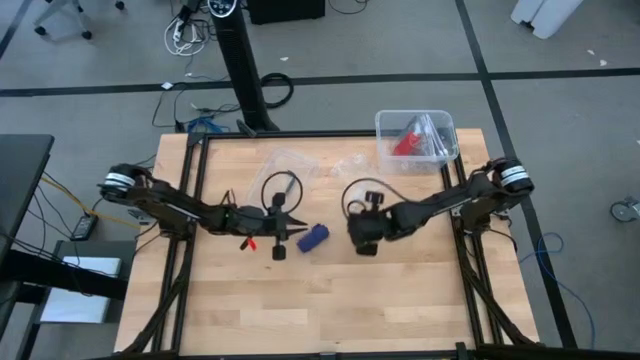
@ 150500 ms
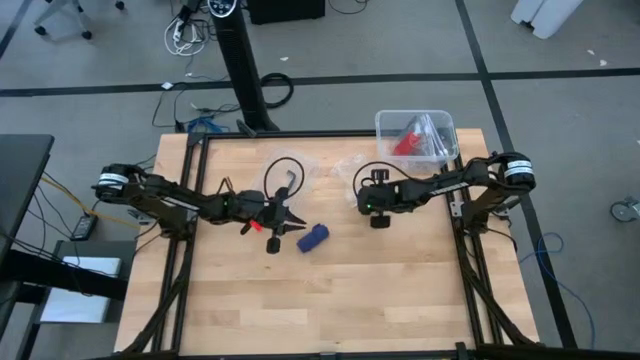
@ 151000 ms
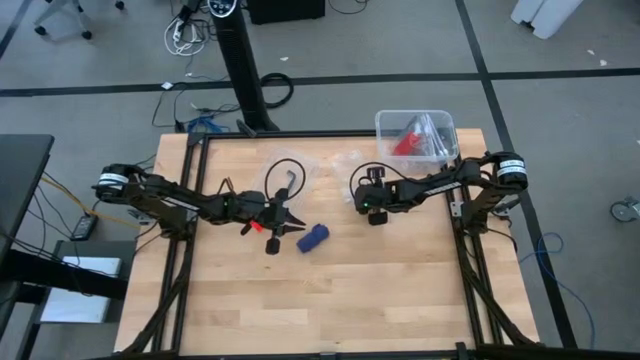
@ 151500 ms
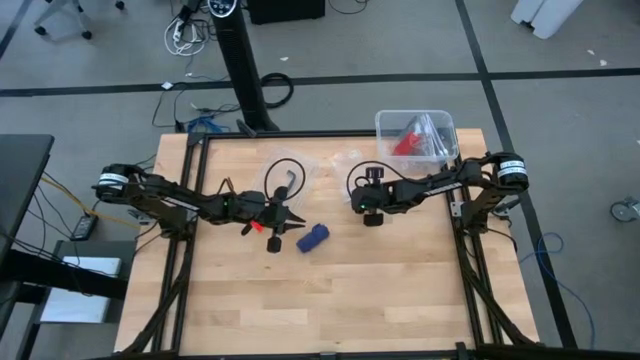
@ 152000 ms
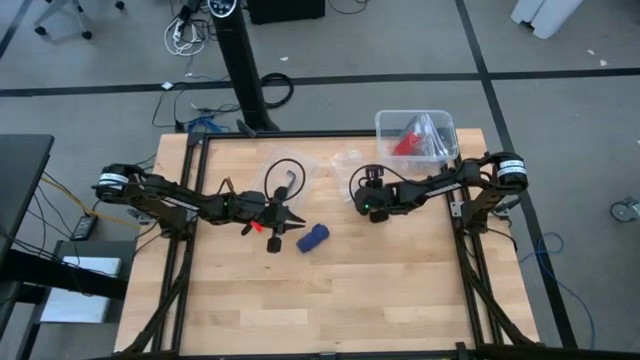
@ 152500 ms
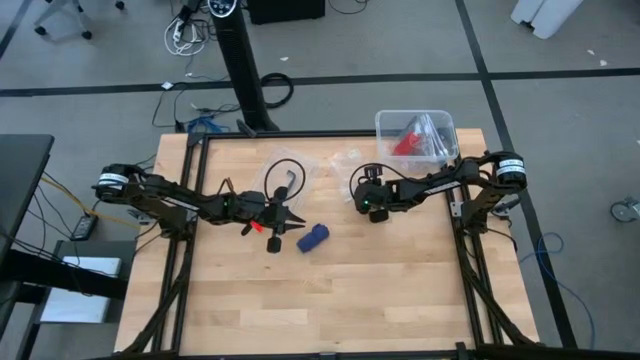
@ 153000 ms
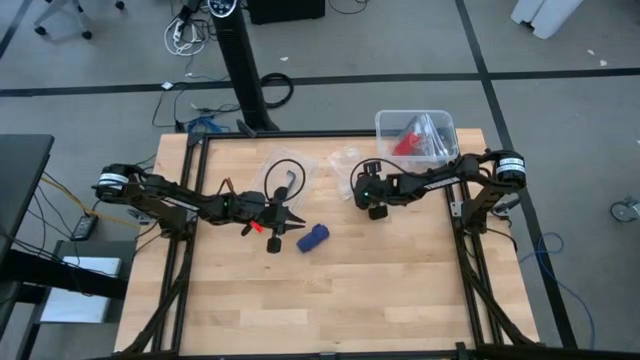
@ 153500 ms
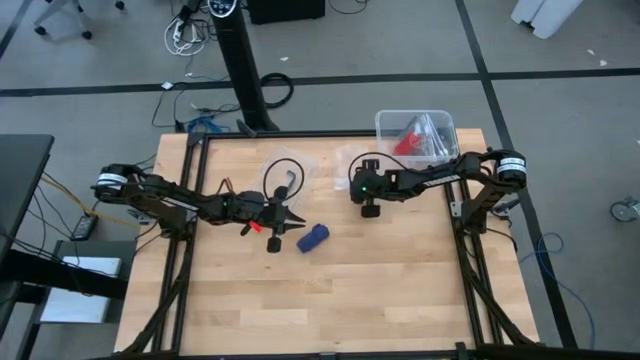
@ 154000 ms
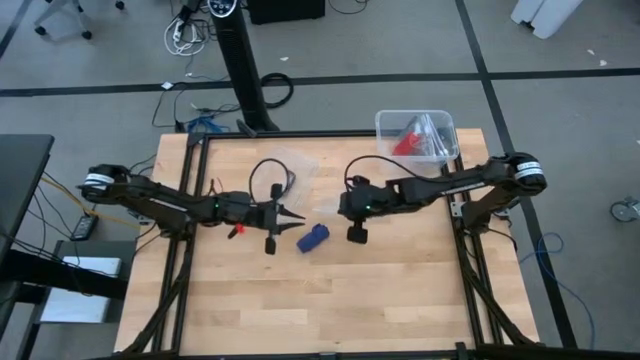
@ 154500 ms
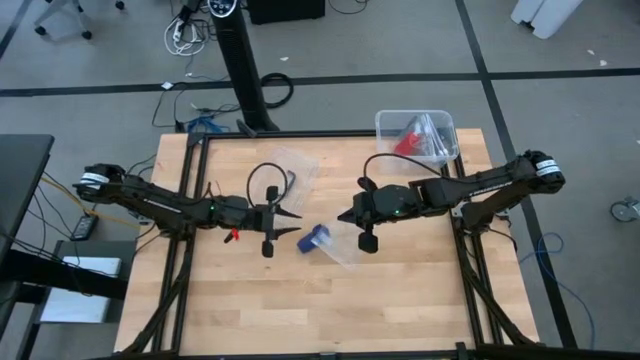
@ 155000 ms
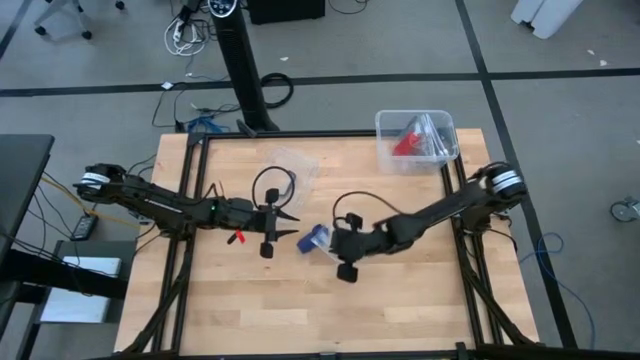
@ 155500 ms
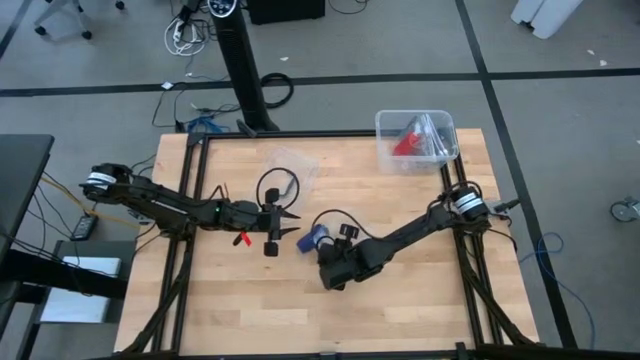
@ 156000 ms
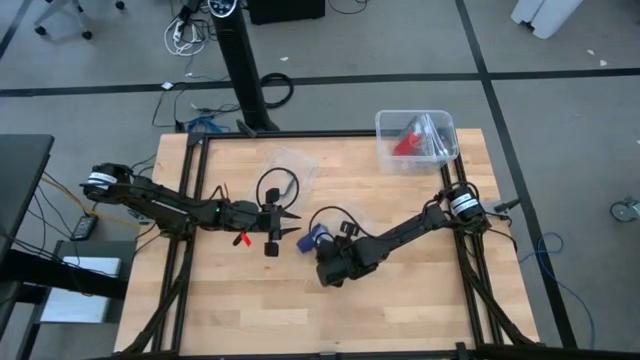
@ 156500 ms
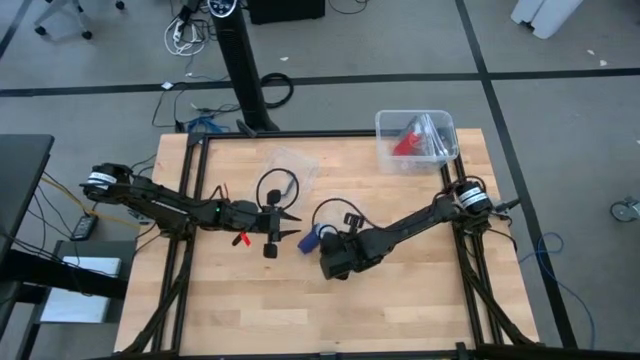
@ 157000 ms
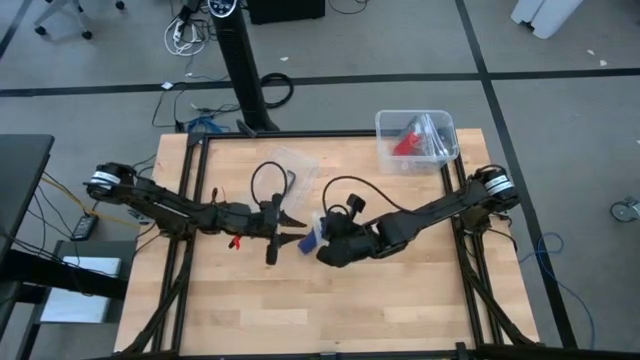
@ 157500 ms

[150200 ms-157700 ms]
Task: Roll bandage
Open the transparent zip bag

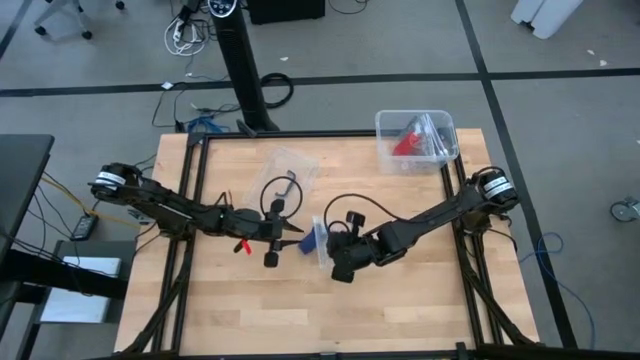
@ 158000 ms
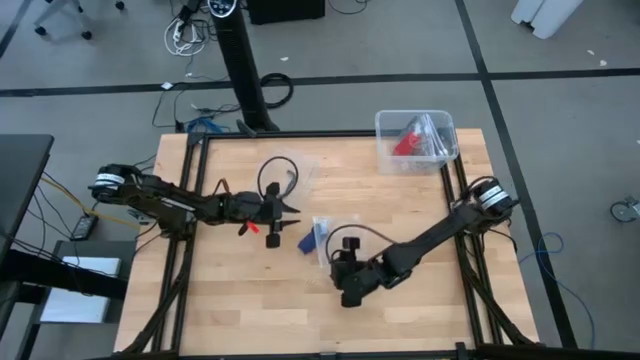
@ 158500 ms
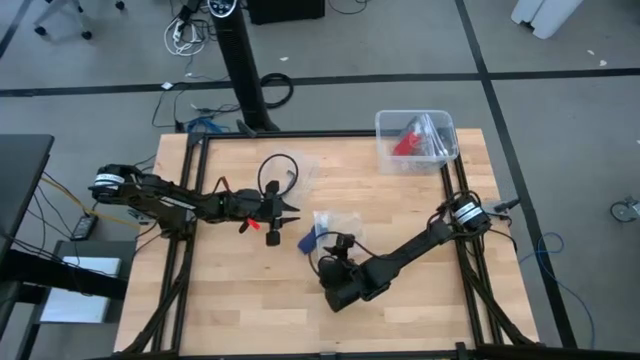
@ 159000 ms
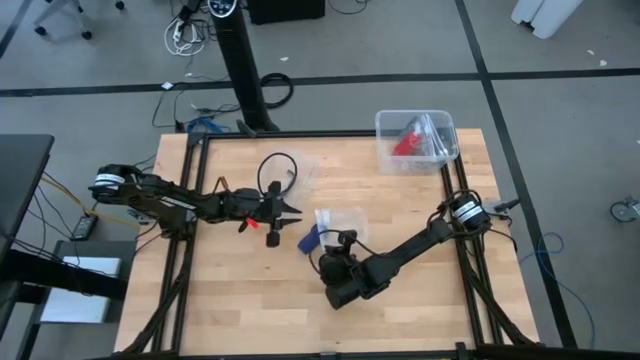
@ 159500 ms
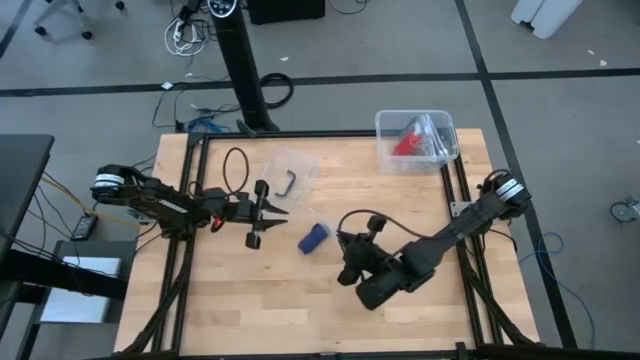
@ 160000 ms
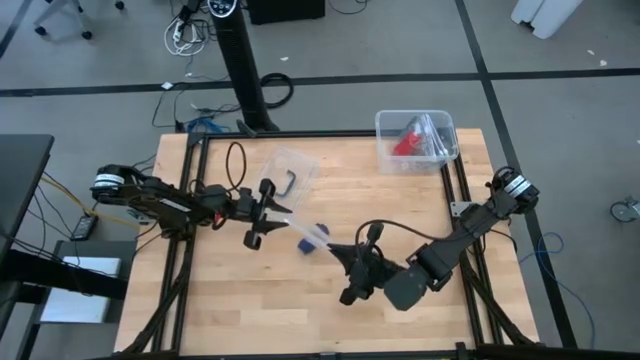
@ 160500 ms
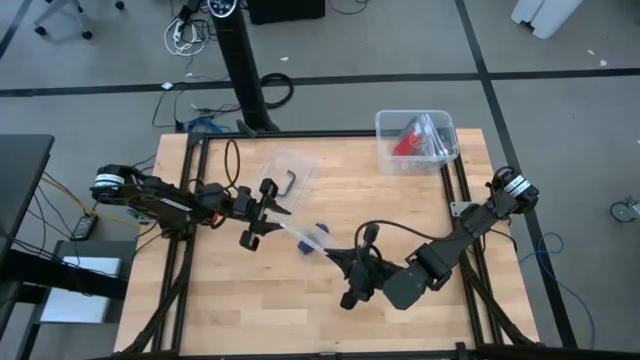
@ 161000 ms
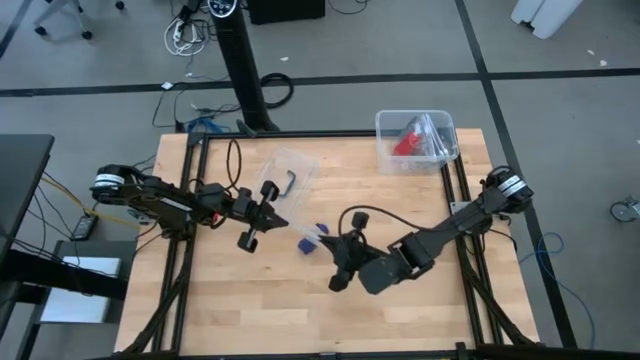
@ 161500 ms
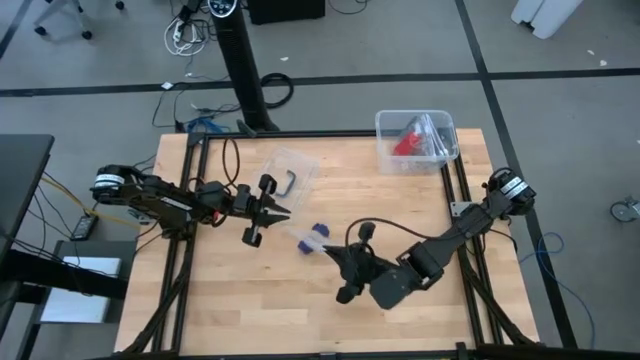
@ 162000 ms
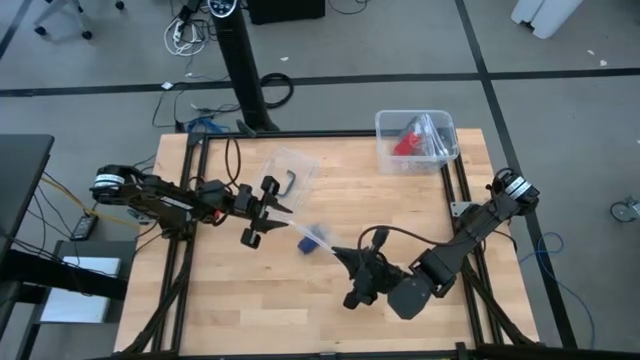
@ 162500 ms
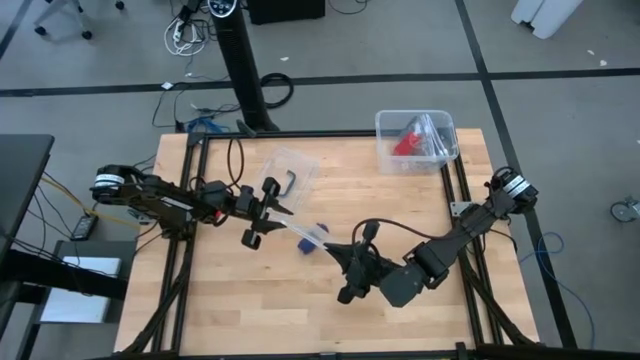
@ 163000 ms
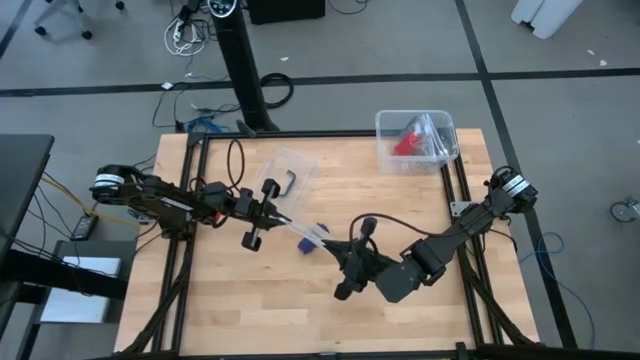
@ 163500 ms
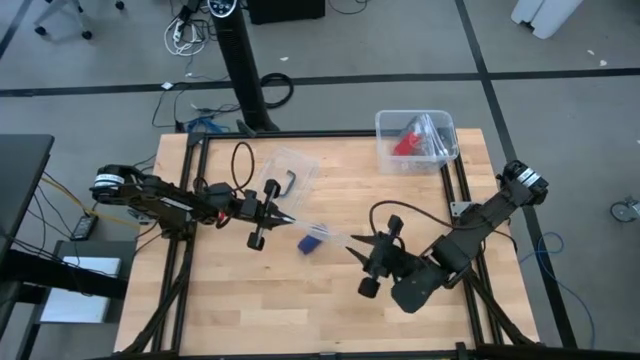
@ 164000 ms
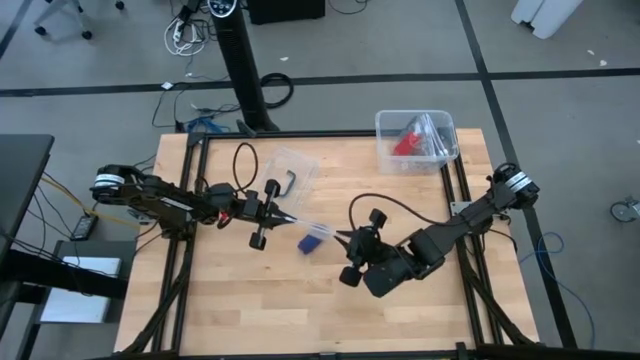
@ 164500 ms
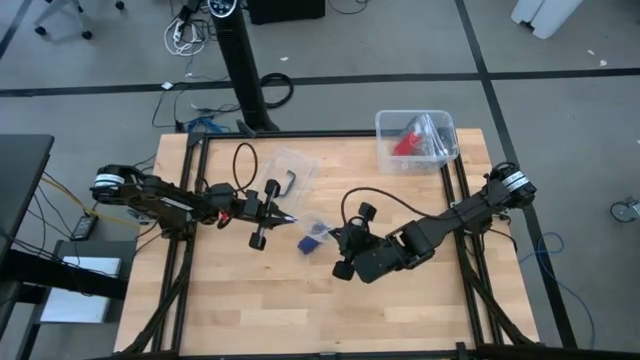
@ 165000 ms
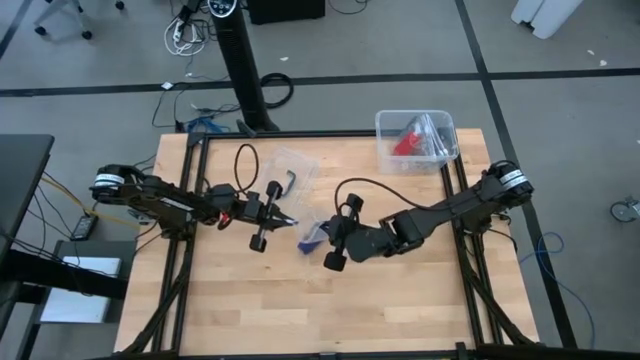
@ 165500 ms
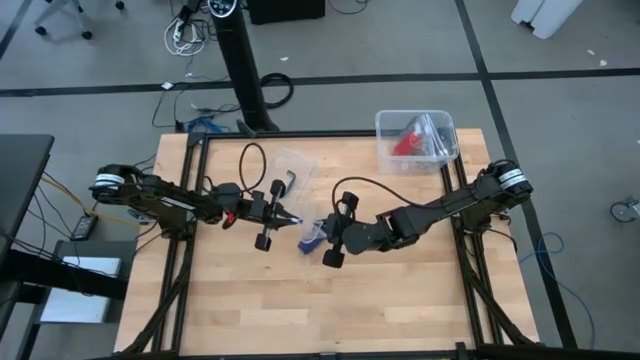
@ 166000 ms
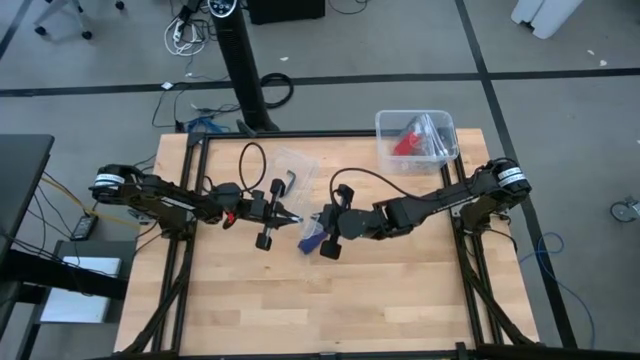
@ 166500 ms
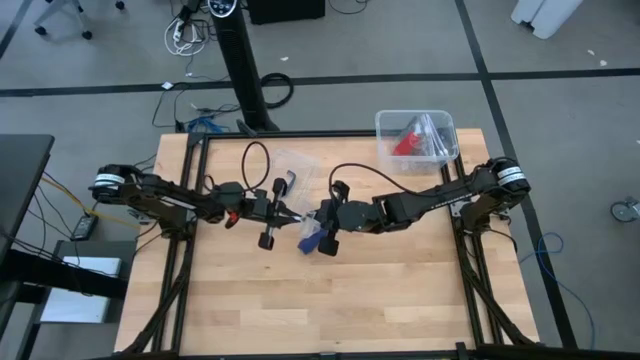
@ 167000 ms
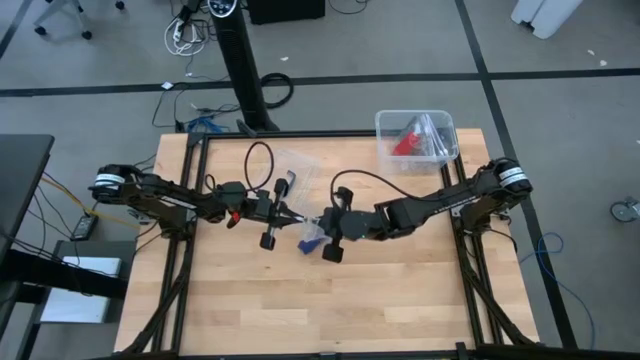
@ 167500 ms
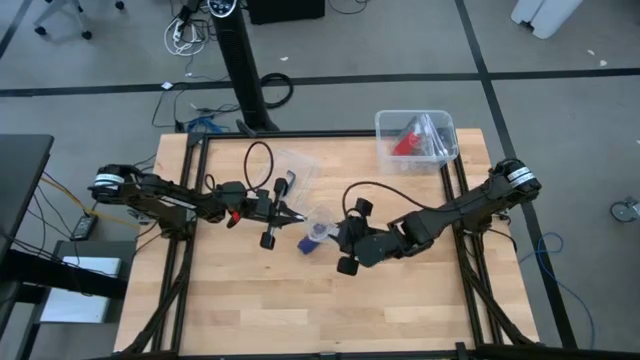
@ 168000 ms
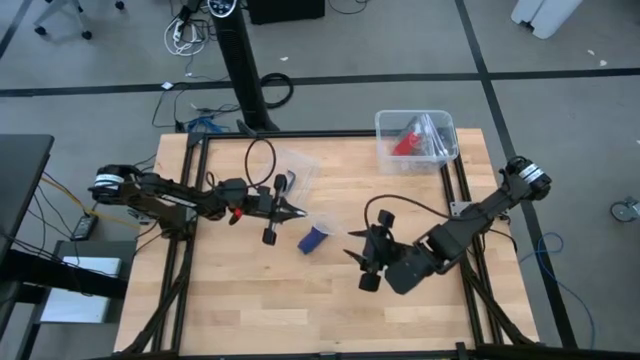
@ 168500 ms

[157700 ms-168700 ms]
Open the transparent zip bag
